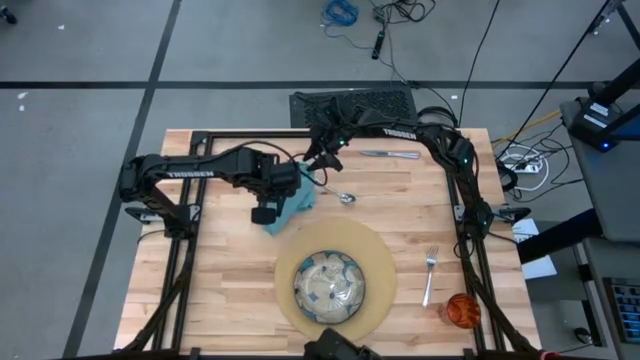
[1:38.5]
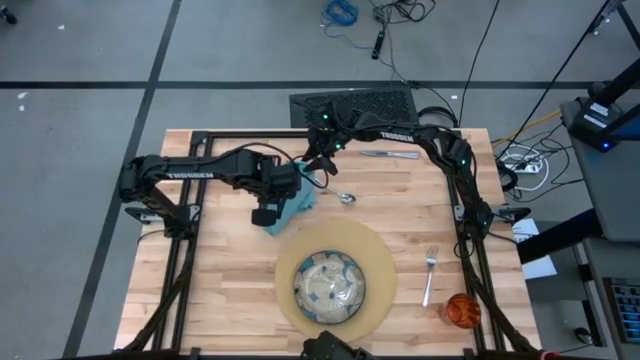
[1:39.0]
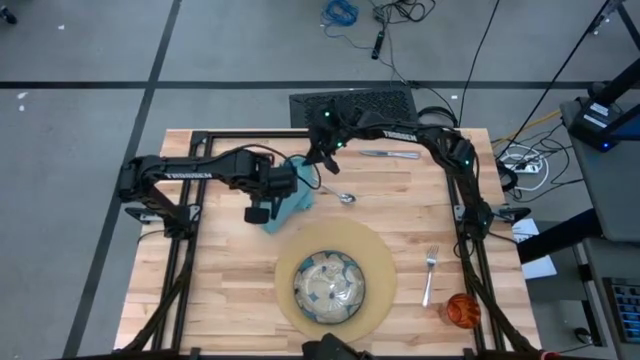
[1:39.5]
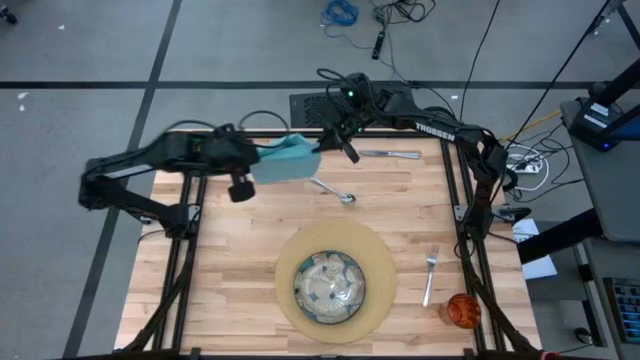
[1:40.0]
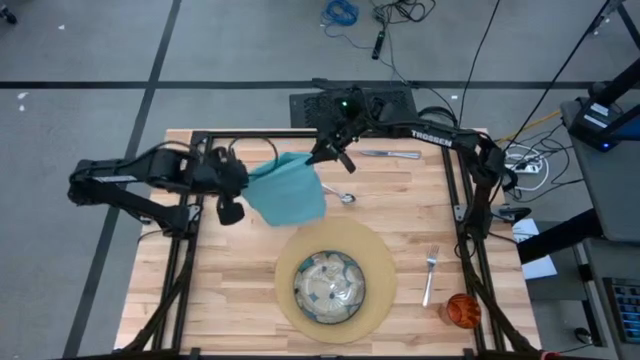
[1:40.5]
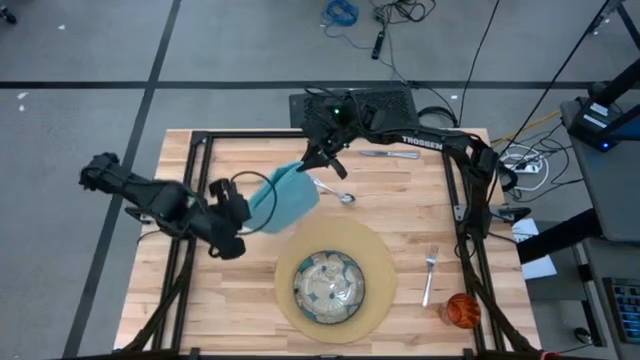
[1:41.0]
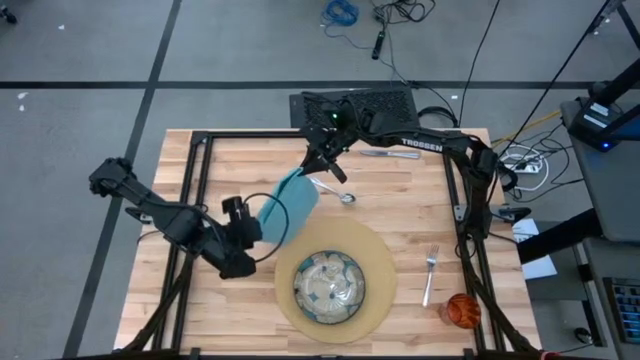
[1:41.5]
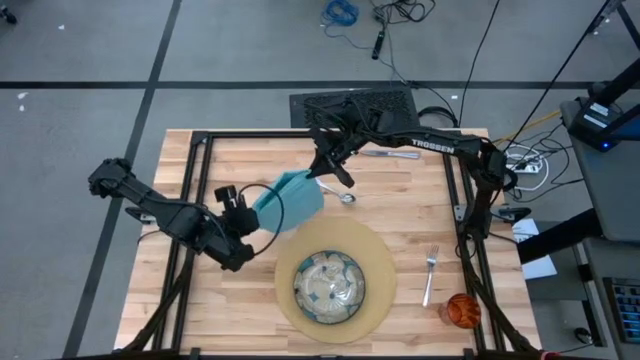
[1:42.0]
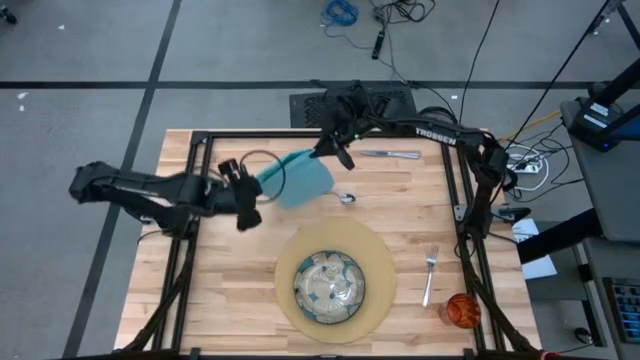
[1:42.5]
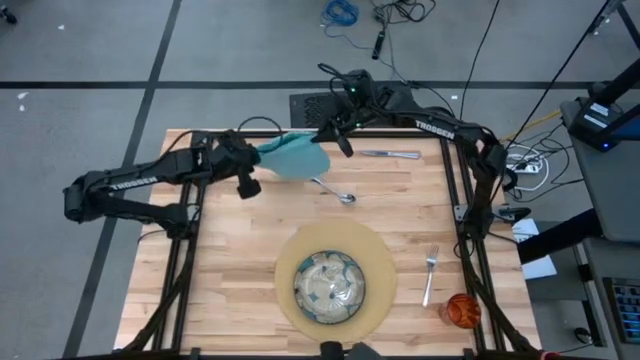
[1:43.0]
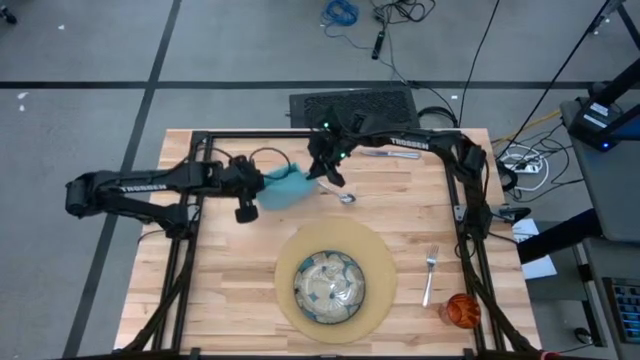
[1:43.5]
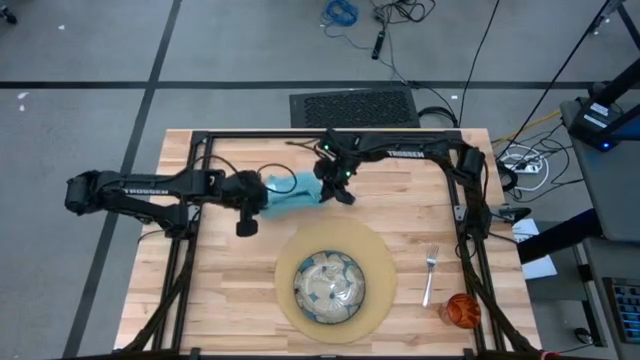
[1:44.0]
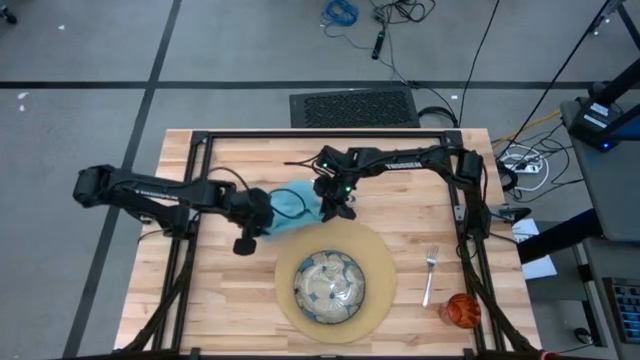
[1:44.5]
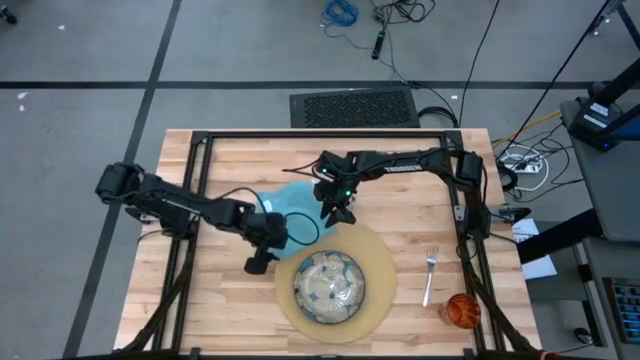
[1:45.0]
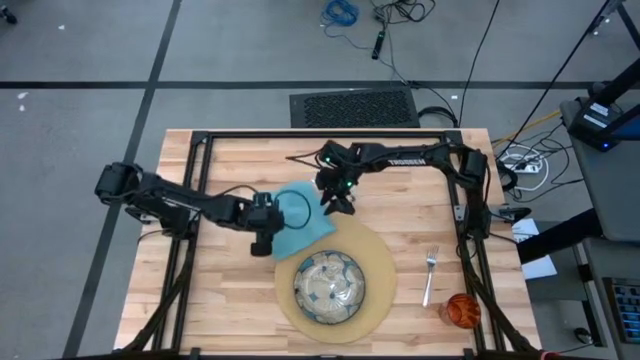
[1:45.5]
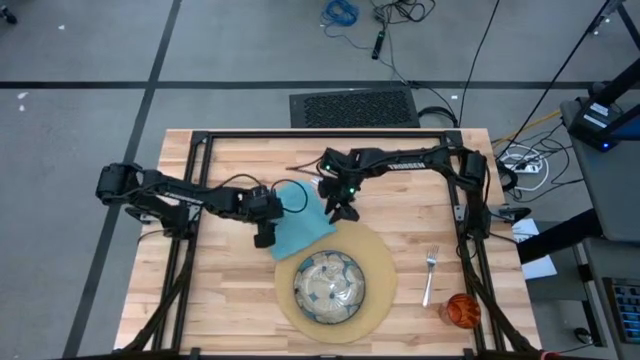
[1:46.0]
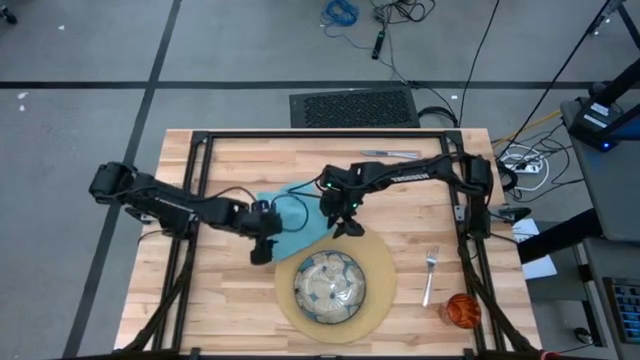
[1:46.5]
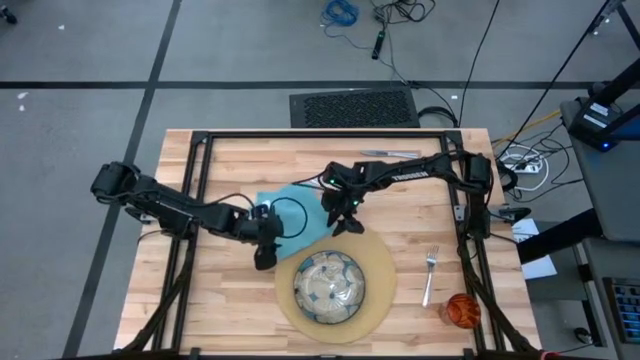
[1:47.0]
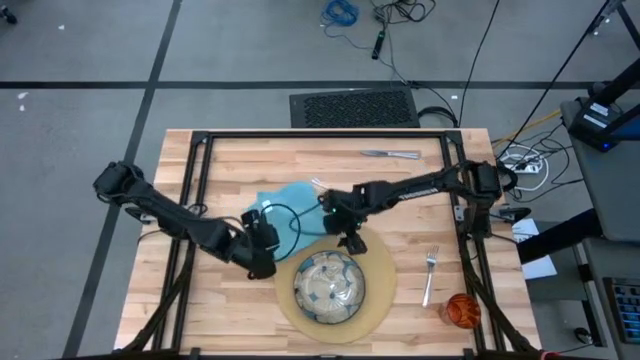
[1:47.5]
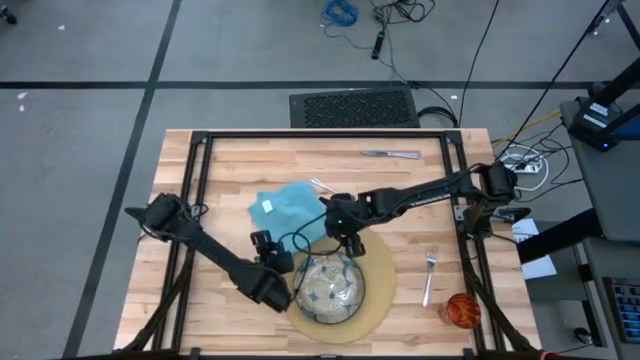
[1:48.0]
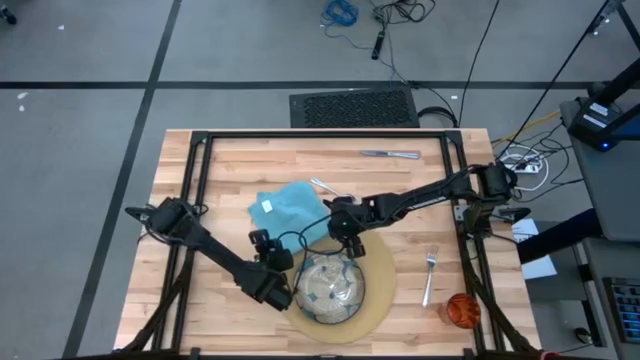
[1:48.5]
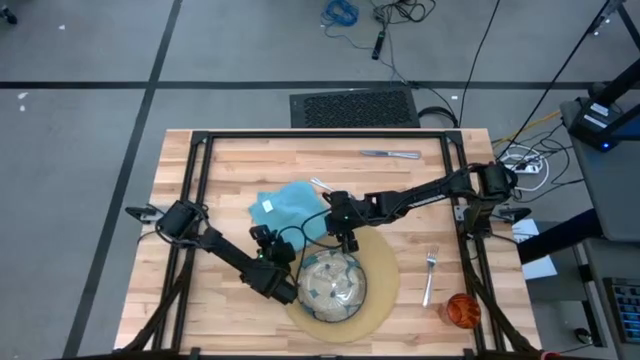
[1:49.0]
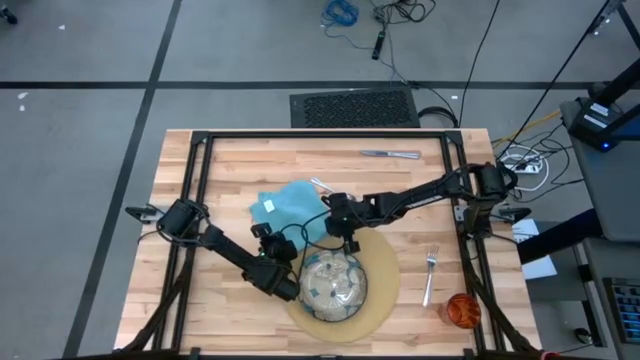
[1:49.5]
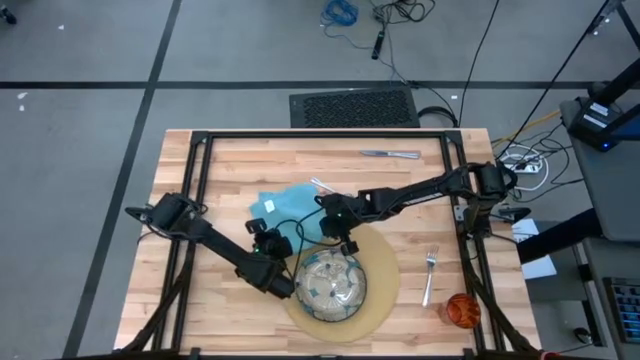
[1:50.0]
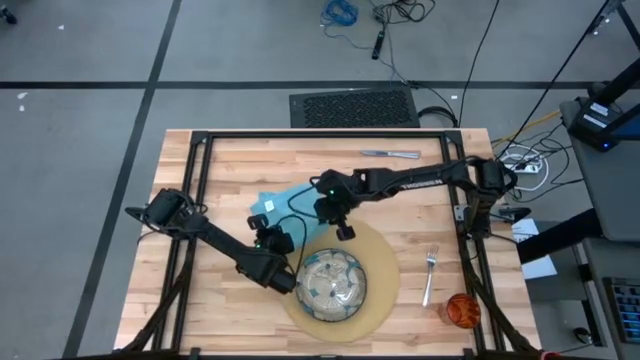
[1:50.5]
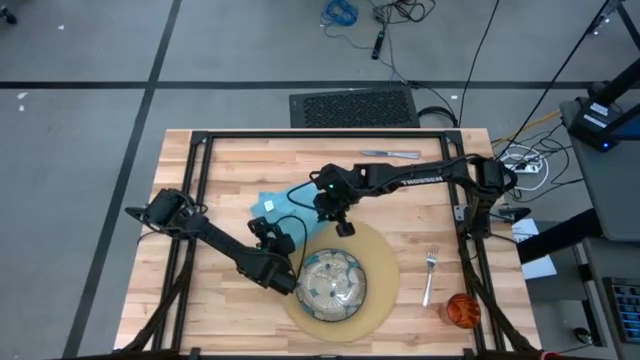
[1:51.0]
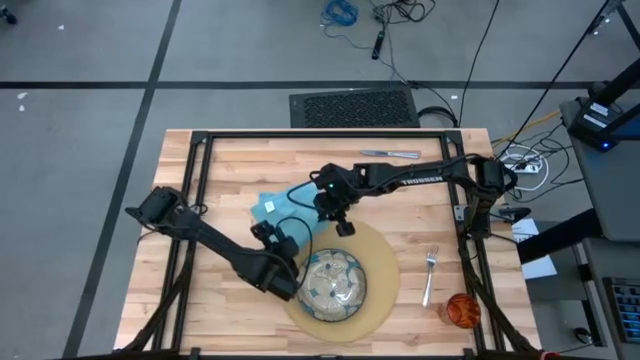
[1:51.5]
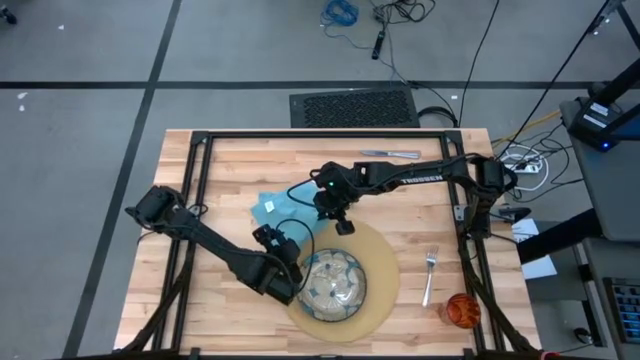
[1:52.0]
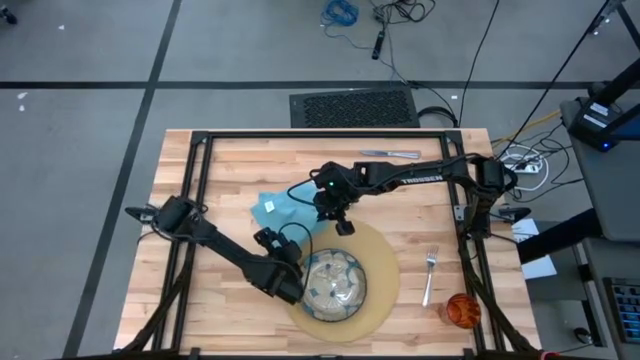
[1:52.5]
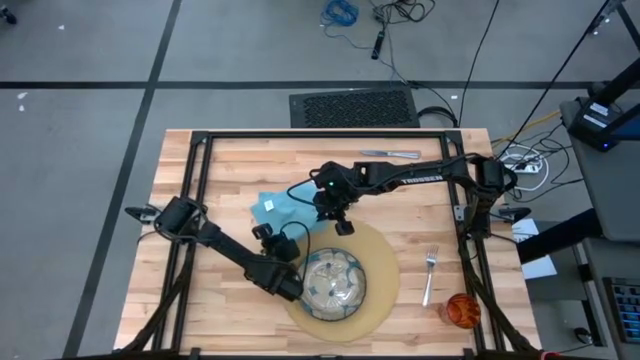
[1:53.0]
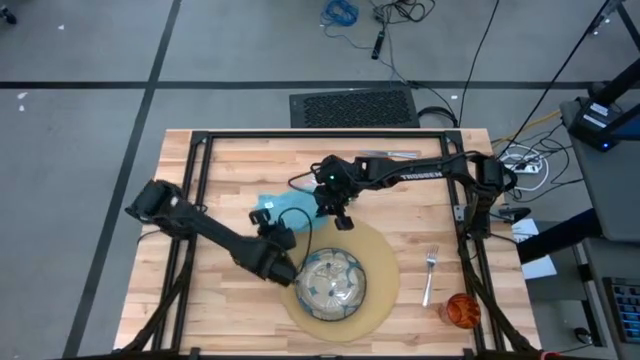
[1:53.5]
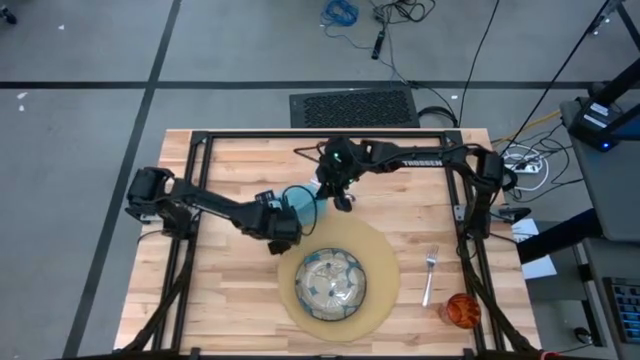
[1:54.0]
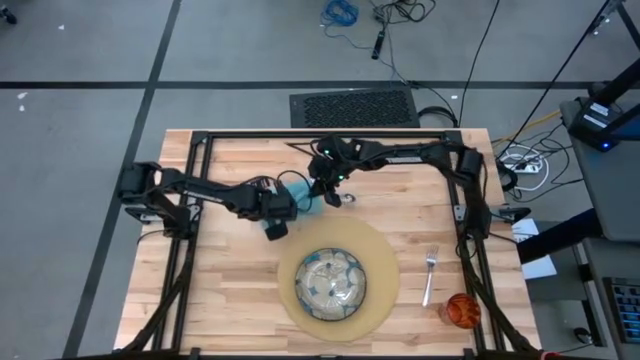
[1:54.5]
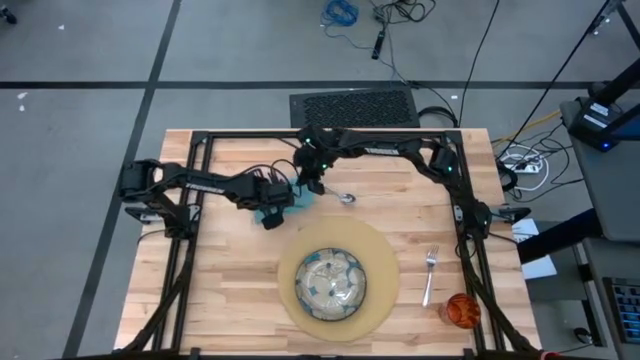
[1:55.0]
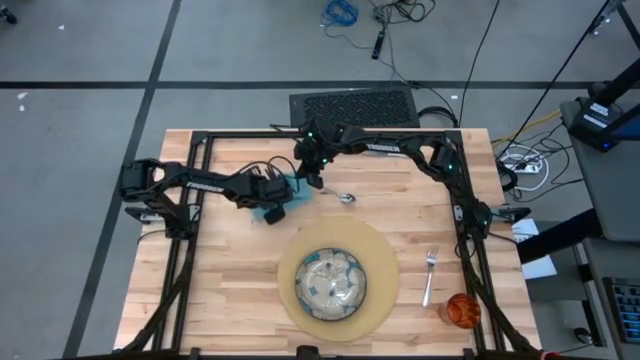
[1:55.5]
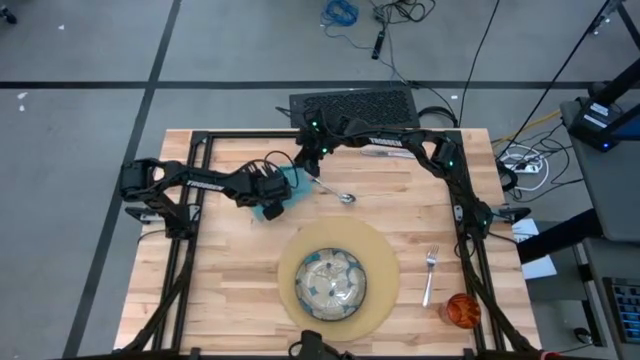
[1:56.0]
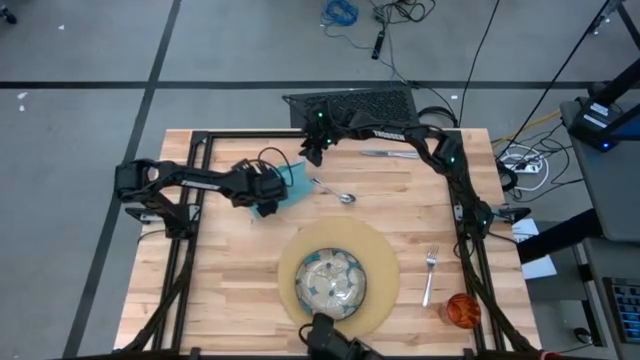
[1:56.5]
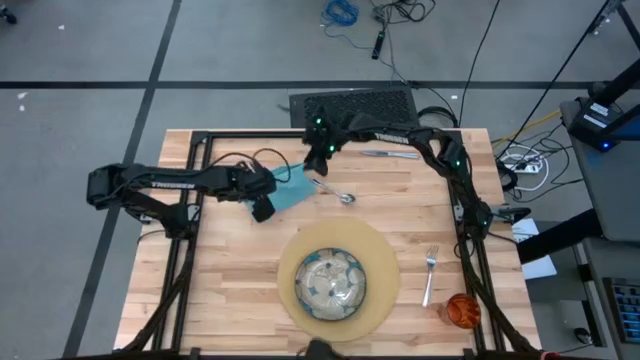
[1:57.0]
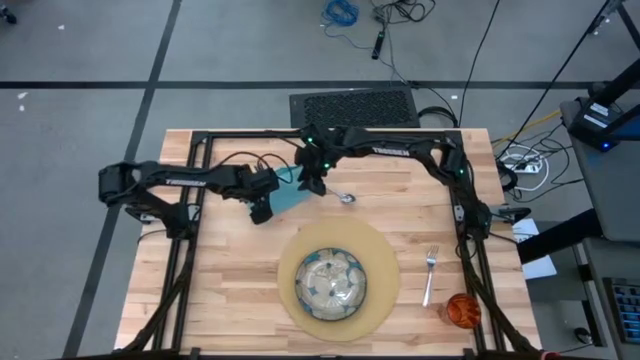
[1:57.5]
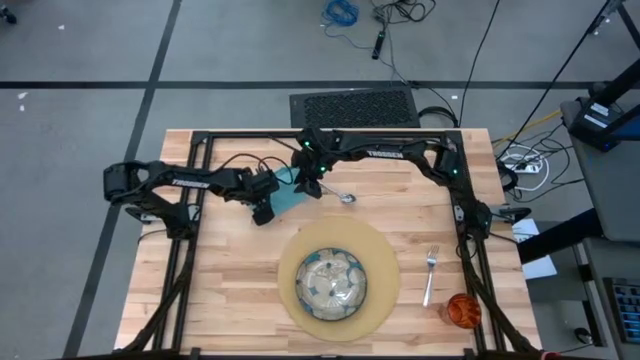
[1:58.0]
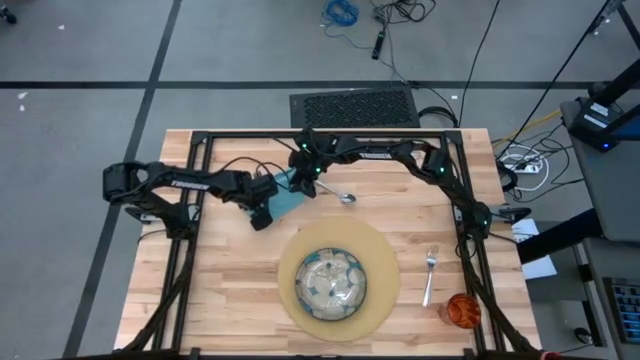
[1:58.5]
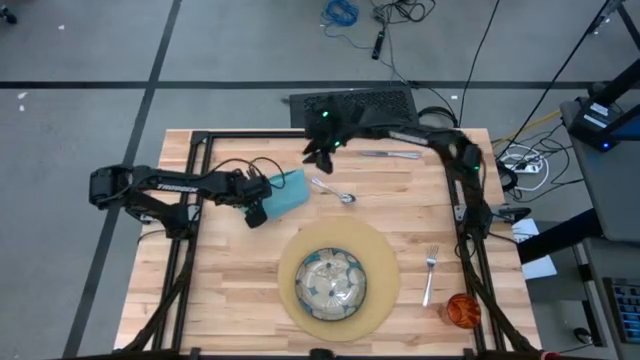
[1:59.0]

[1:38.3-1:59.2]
Task: Set table place
Fold the blue napkin
